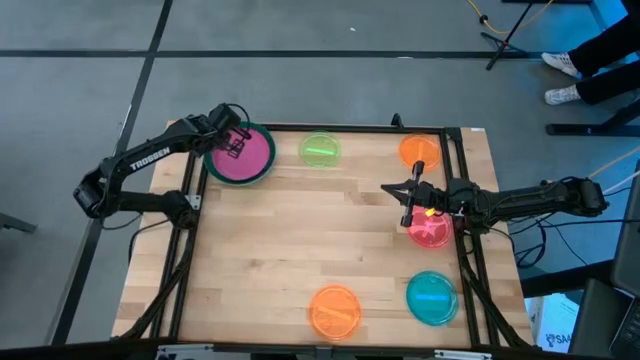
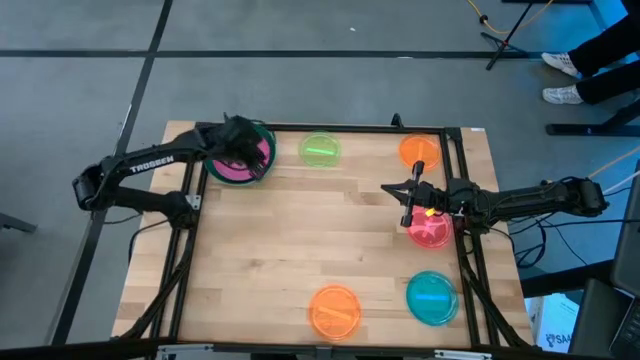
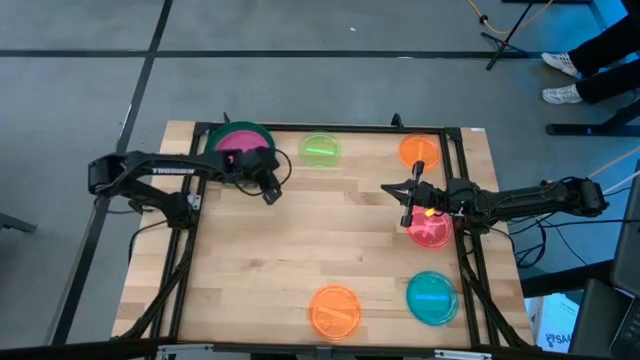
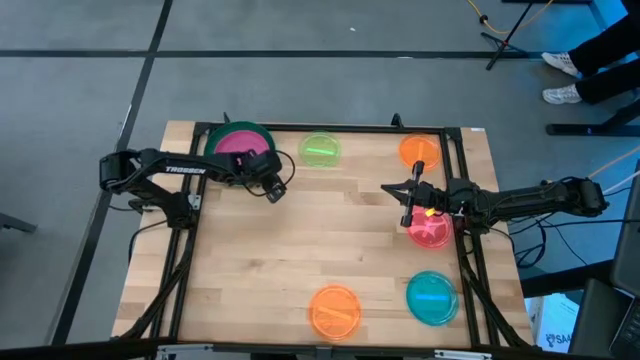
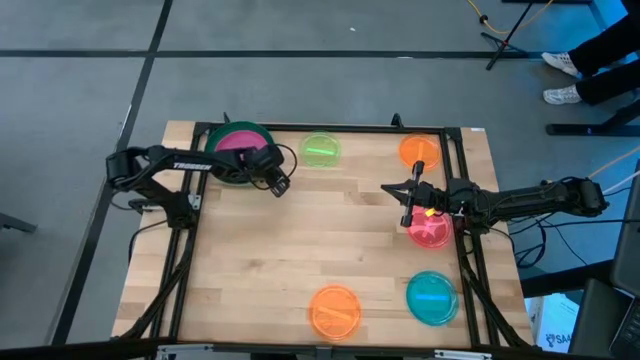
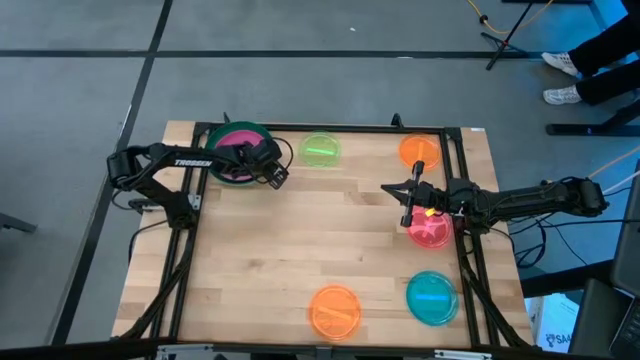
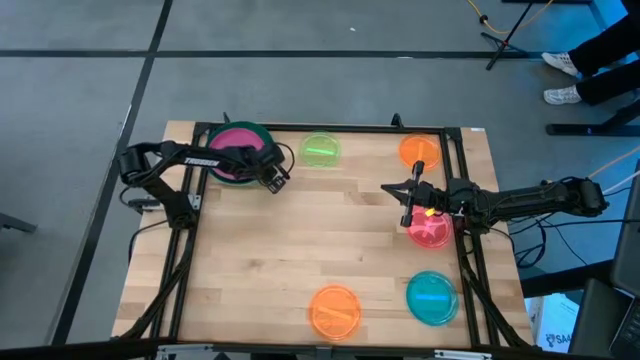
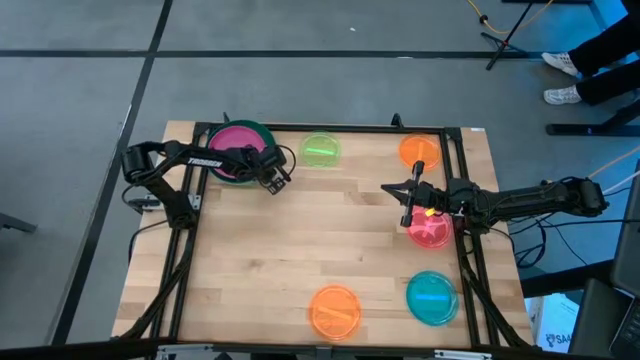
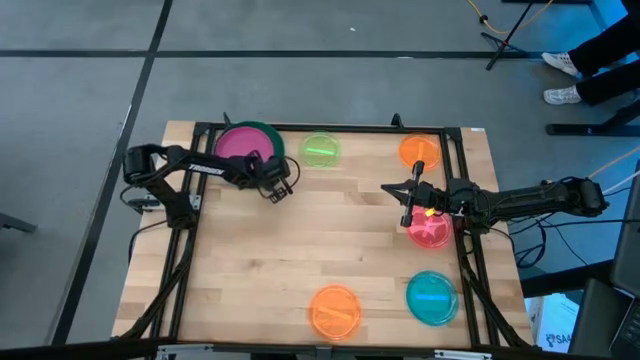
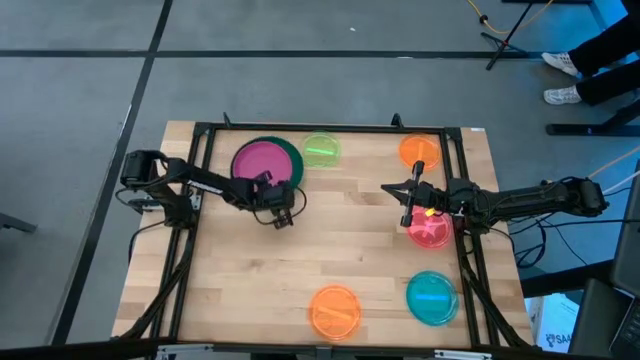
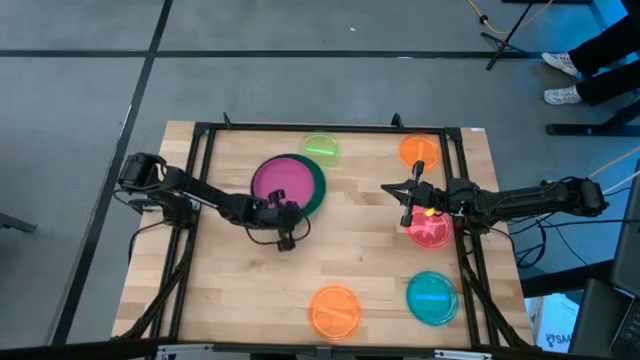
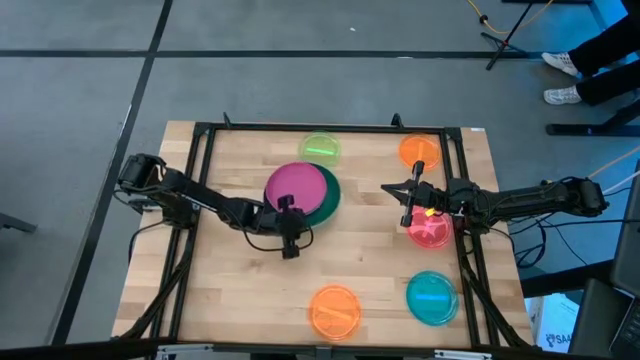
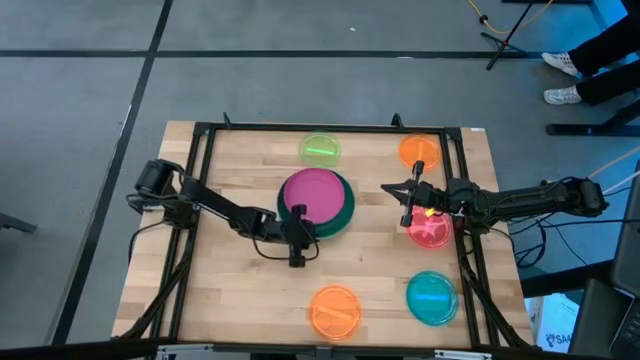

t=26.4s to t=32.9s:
Task: Stack plastic plates
Move the stack of plates to the center of the table

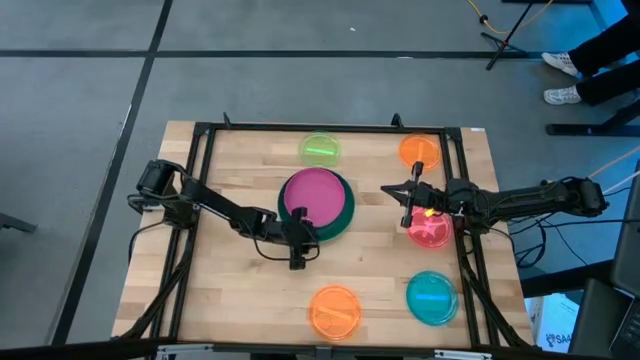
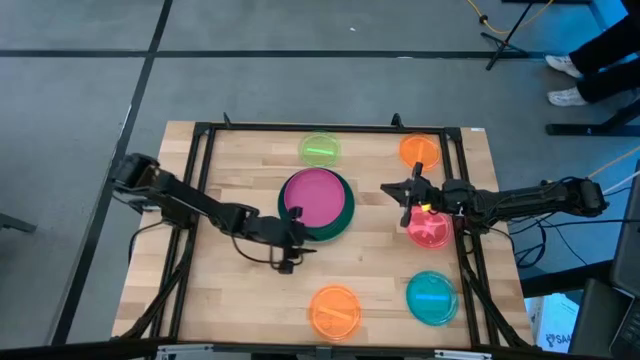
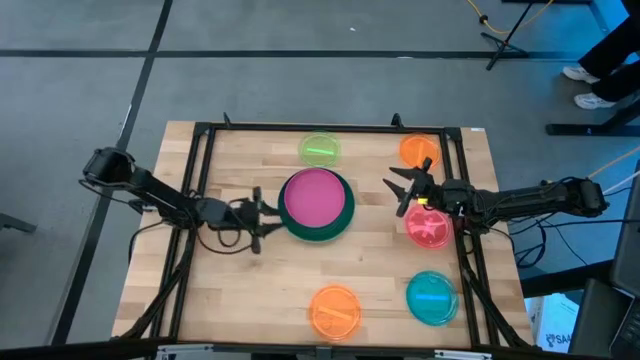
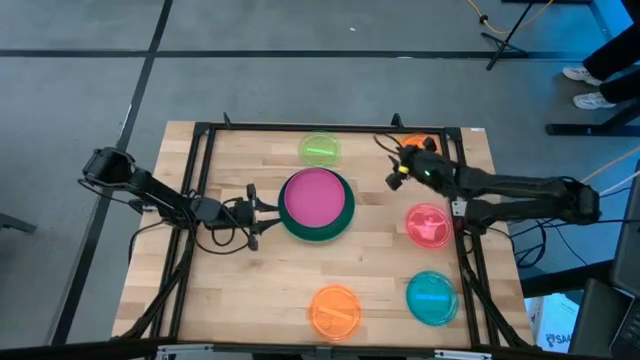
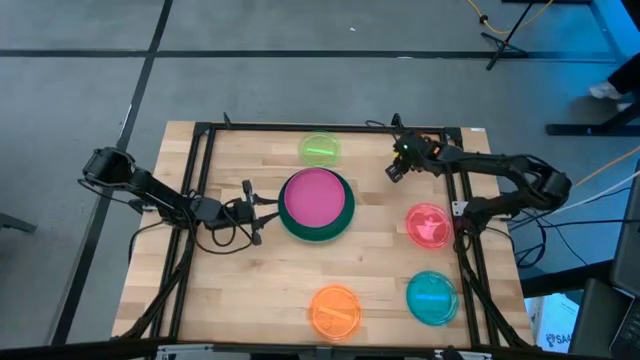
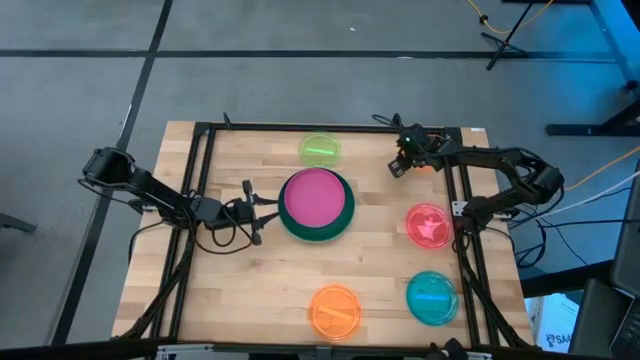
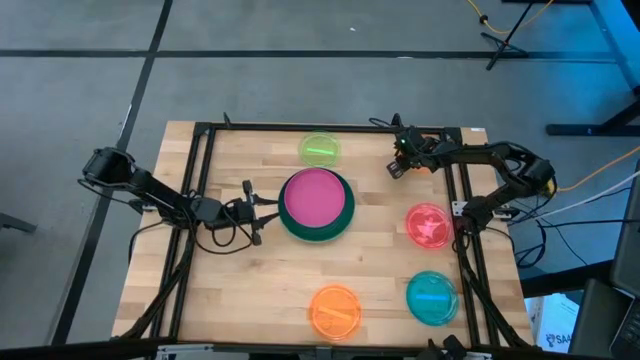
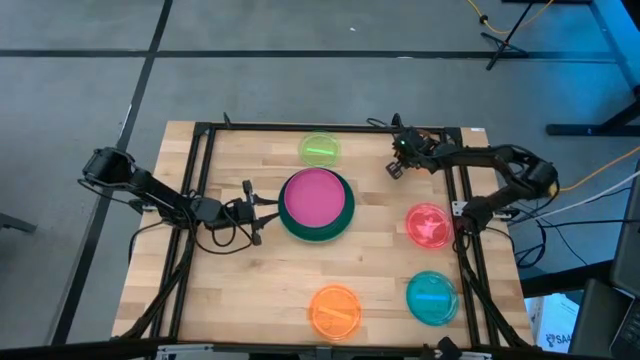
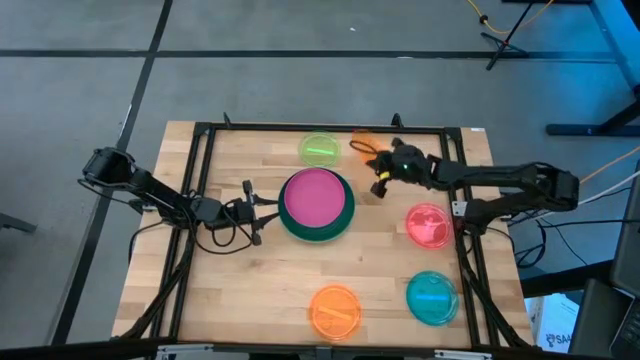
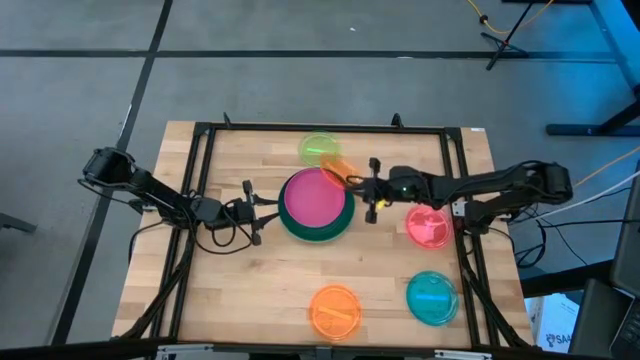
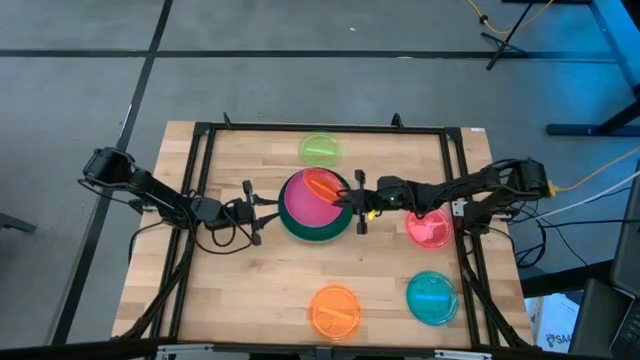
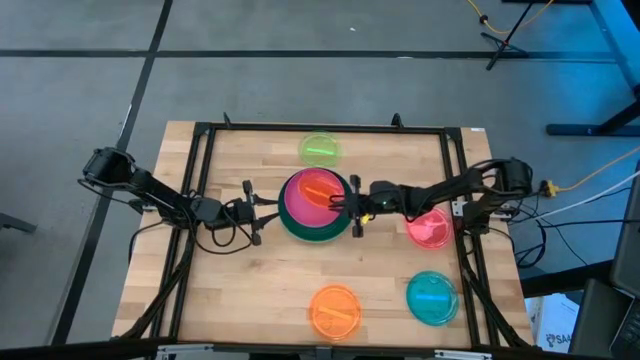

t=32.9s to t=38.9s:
Stack the orange plate on the pink plate

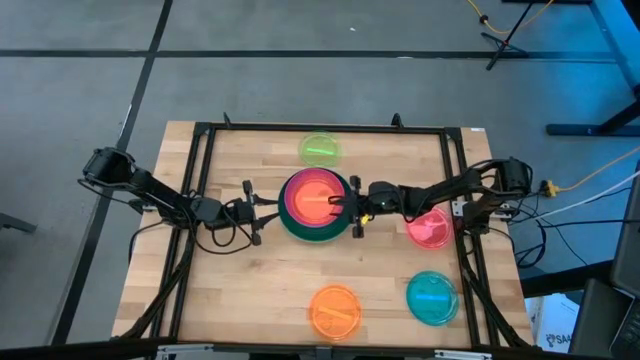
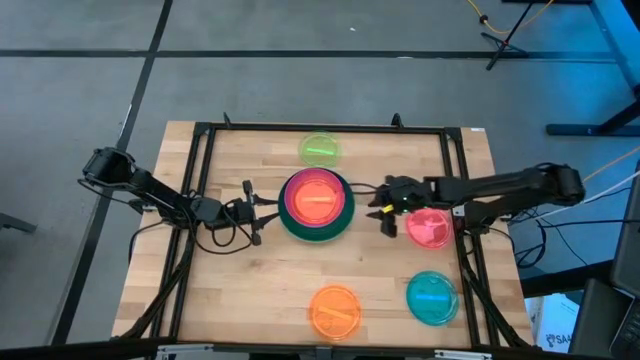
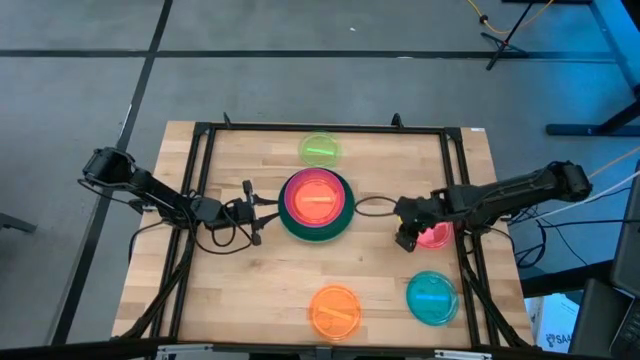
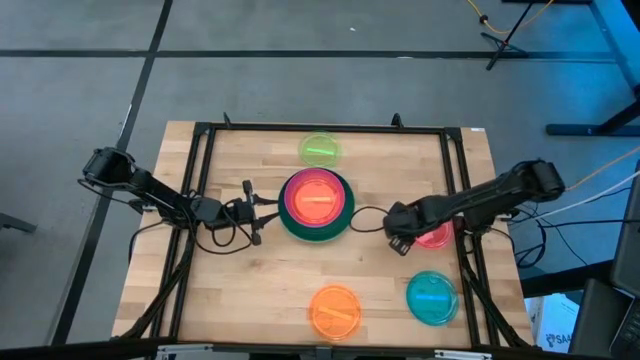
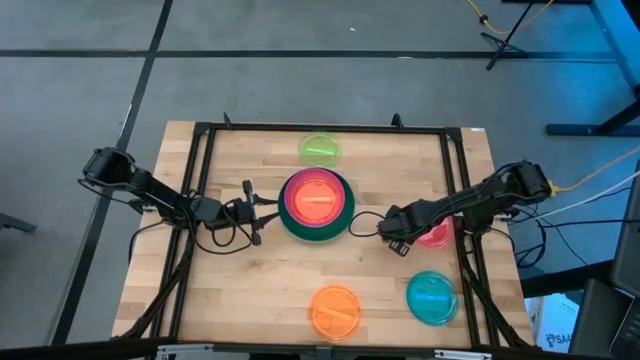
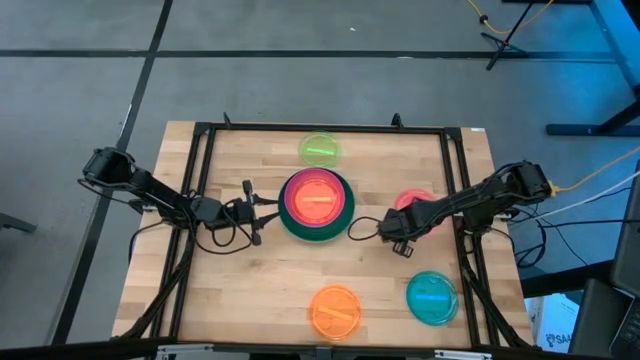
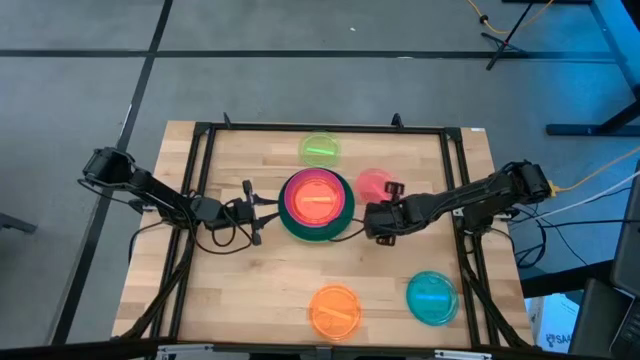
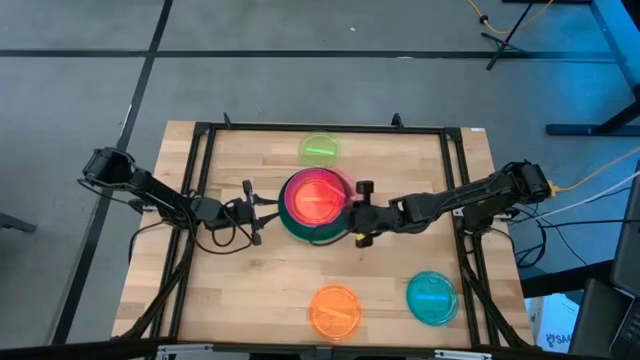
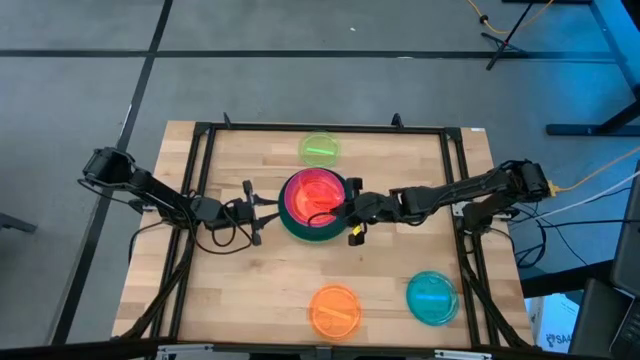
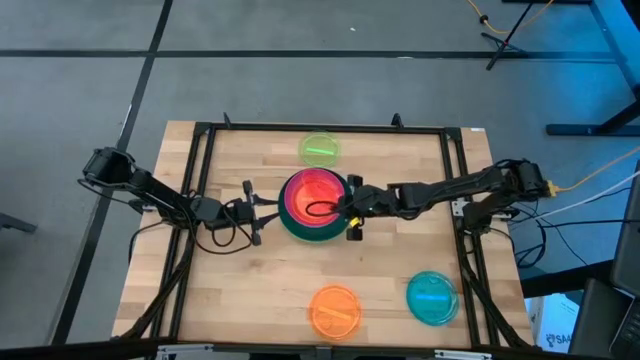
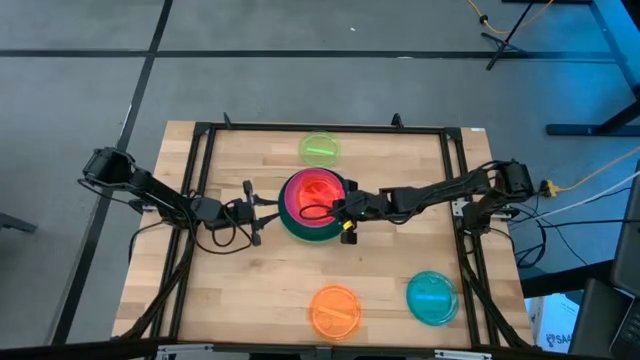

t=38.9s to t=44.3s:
Stack the red plate on the orange plate

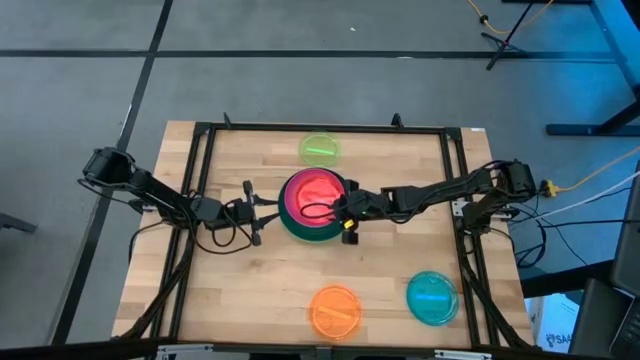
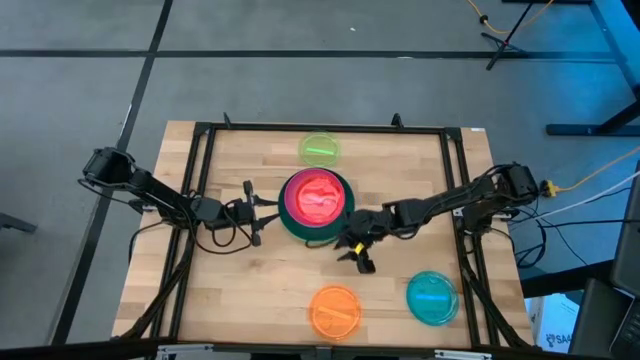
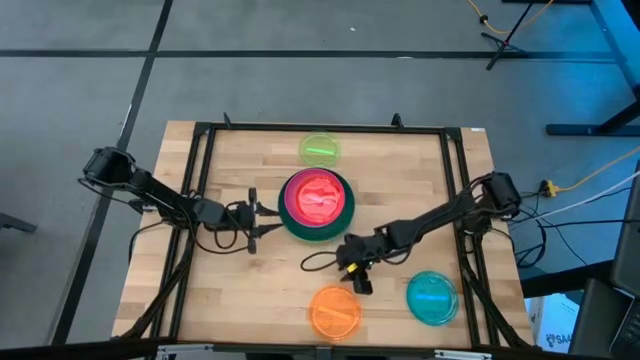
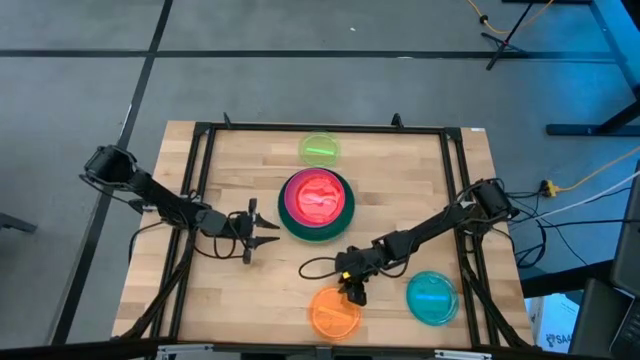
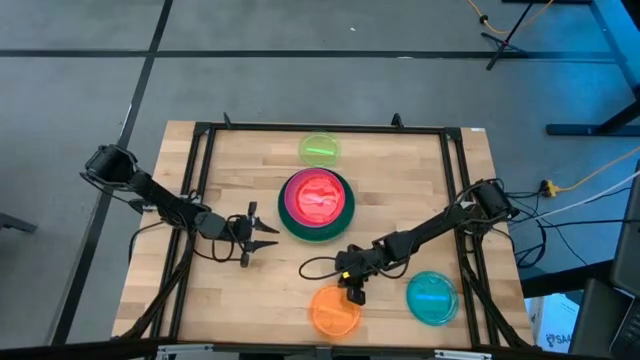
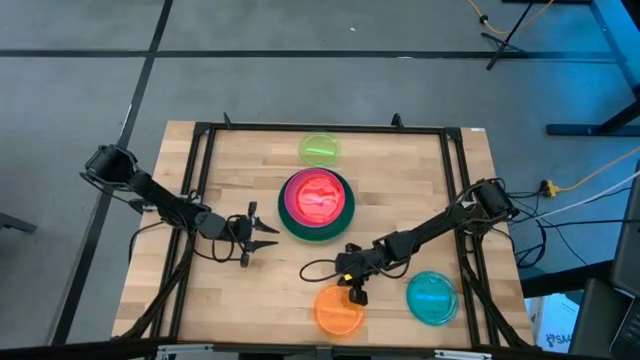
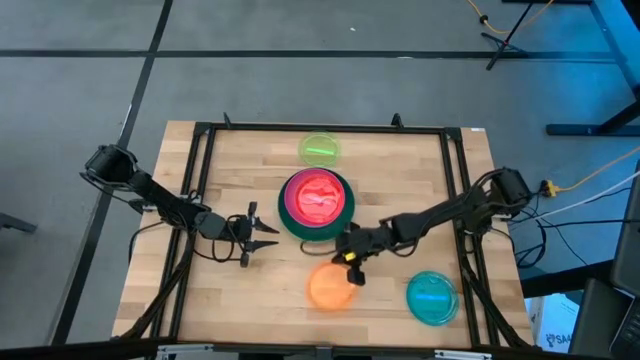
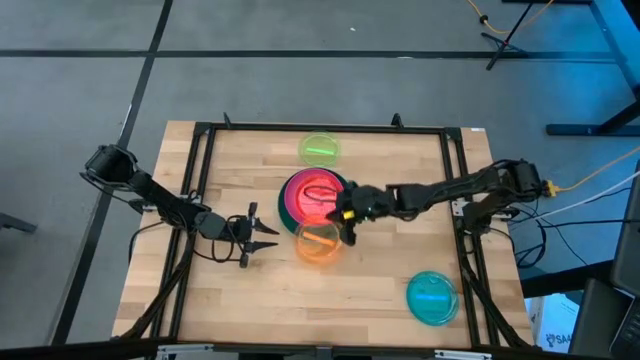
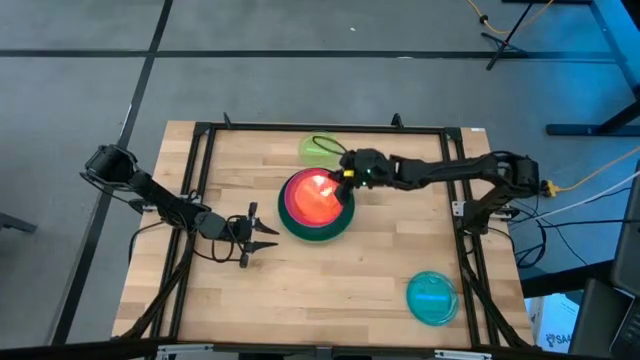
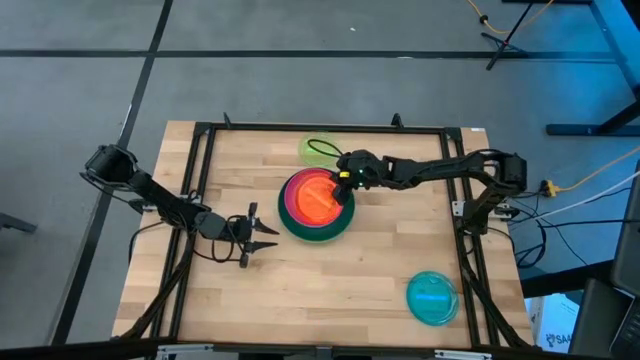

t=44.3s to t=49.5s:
Stack the orange plate on the red plate
